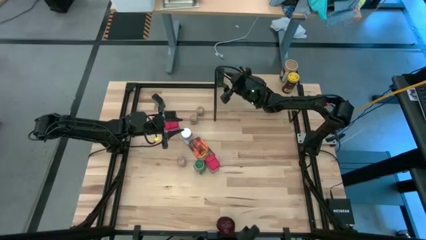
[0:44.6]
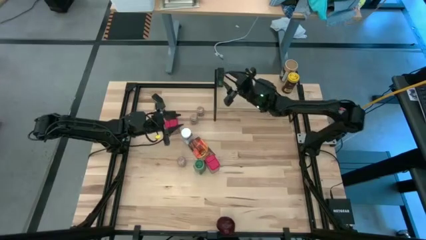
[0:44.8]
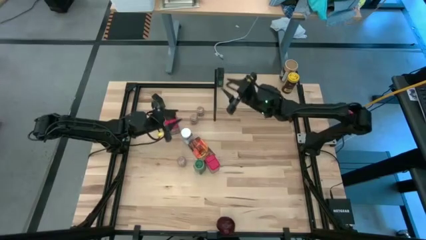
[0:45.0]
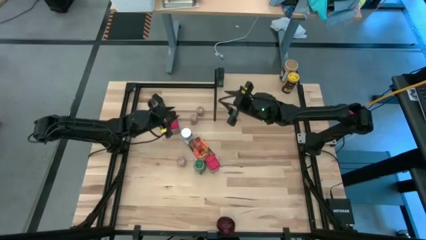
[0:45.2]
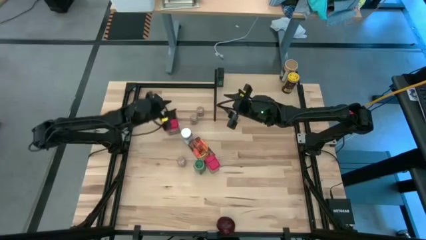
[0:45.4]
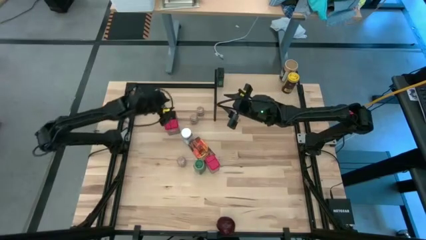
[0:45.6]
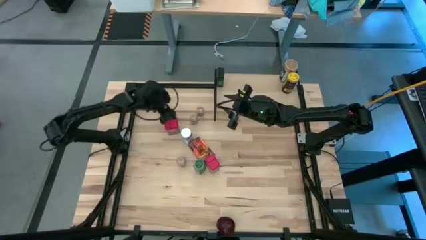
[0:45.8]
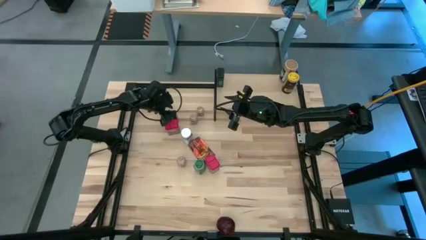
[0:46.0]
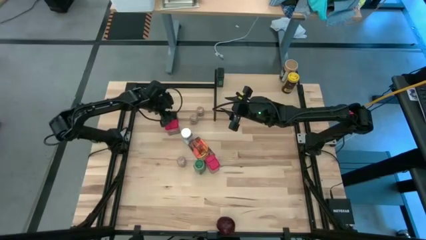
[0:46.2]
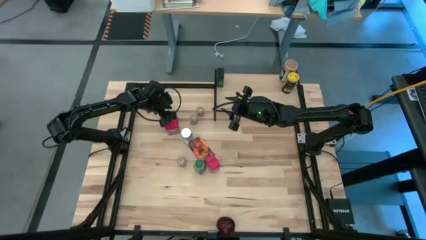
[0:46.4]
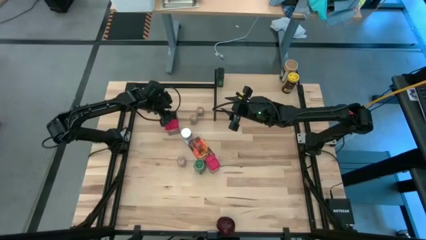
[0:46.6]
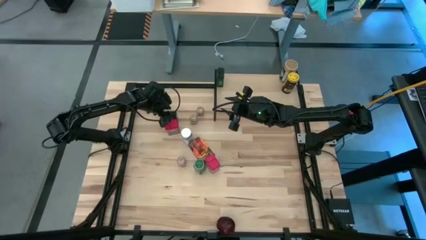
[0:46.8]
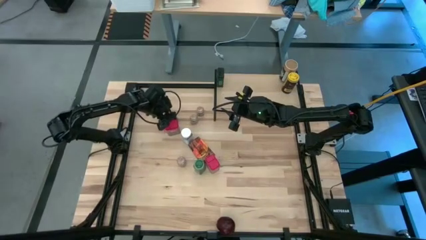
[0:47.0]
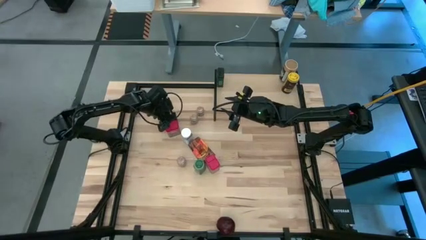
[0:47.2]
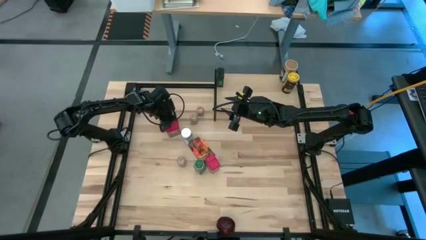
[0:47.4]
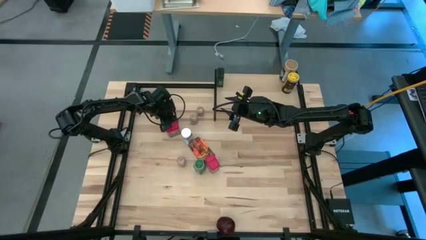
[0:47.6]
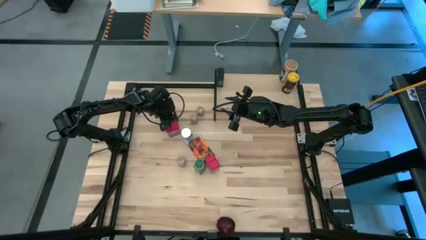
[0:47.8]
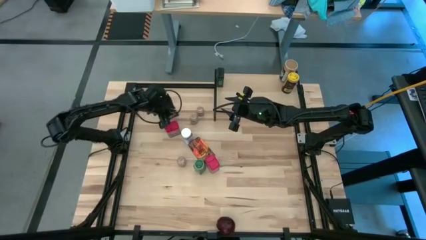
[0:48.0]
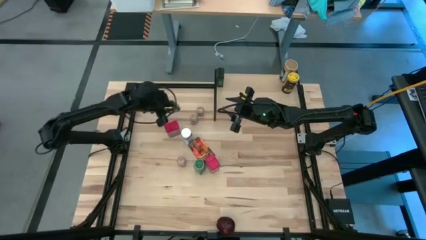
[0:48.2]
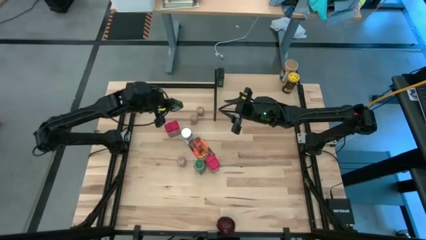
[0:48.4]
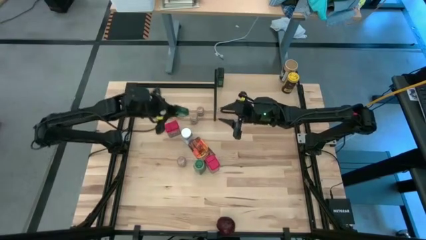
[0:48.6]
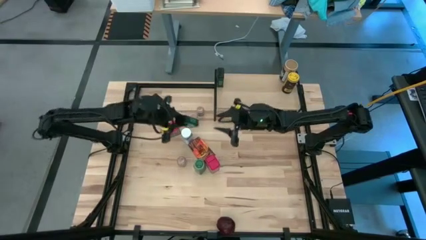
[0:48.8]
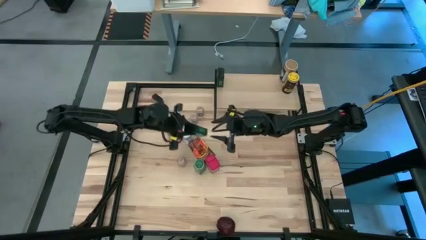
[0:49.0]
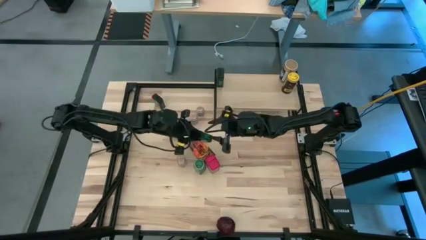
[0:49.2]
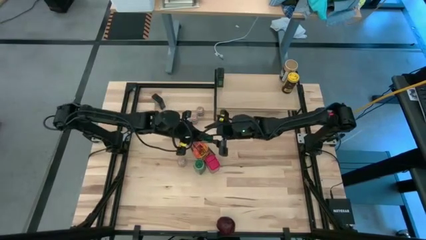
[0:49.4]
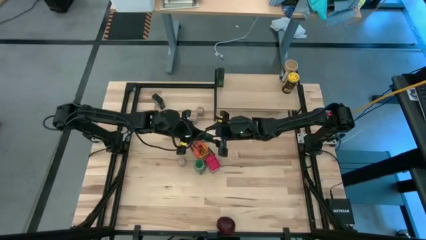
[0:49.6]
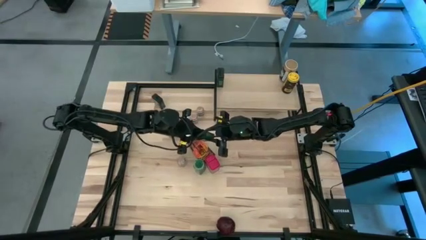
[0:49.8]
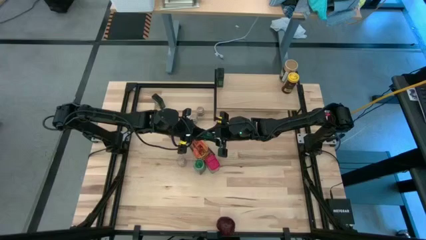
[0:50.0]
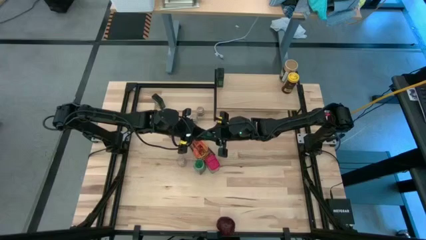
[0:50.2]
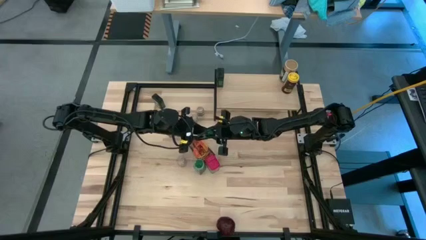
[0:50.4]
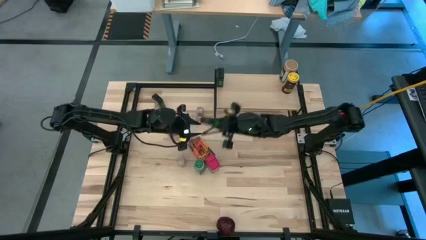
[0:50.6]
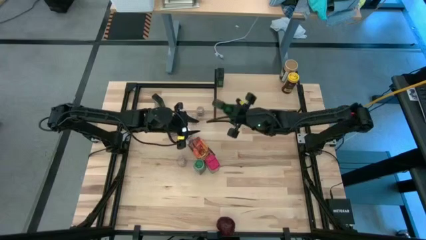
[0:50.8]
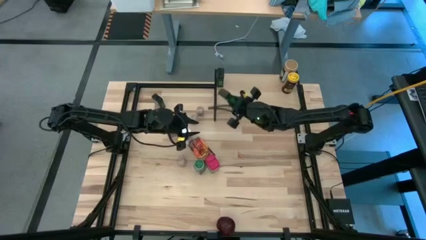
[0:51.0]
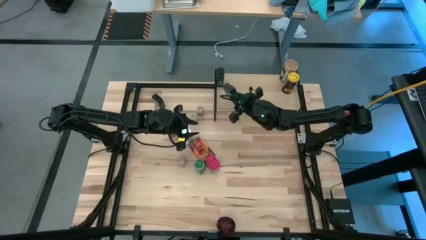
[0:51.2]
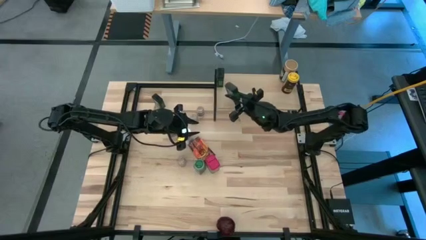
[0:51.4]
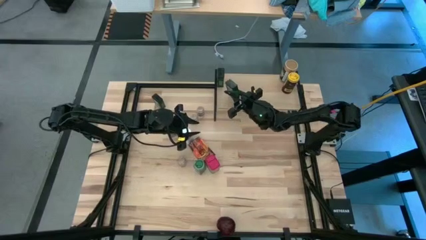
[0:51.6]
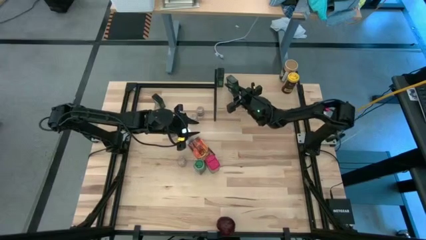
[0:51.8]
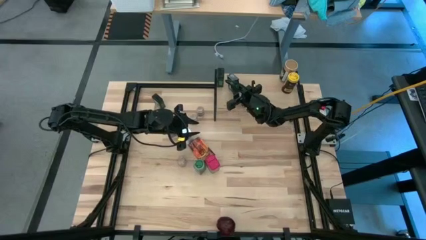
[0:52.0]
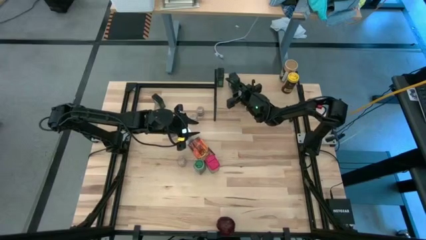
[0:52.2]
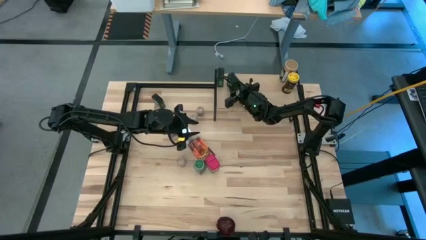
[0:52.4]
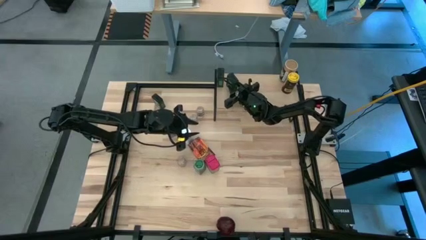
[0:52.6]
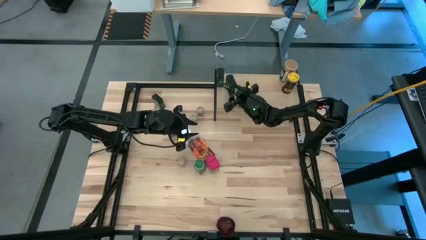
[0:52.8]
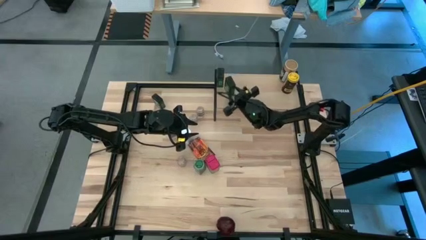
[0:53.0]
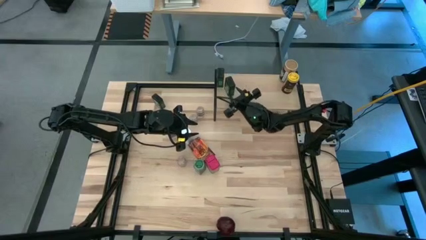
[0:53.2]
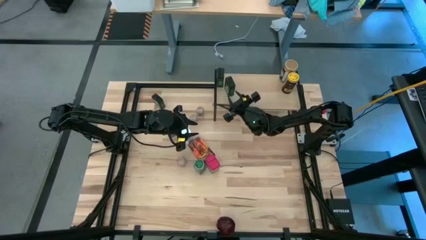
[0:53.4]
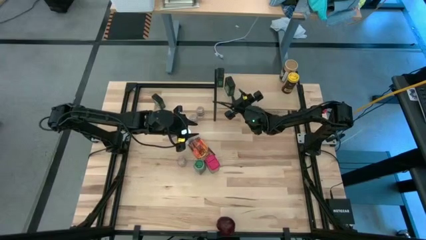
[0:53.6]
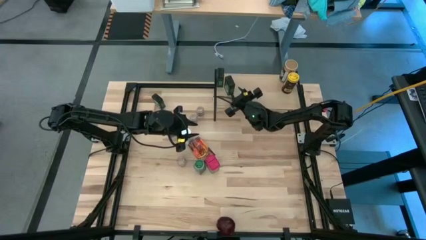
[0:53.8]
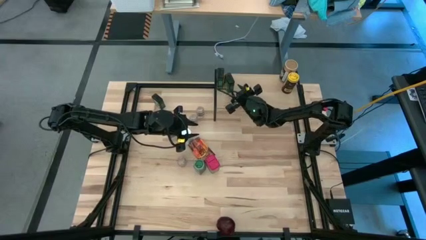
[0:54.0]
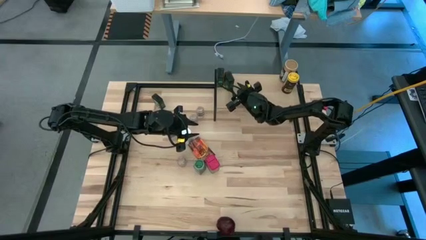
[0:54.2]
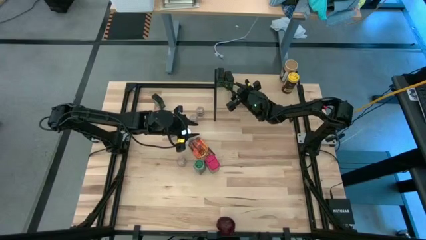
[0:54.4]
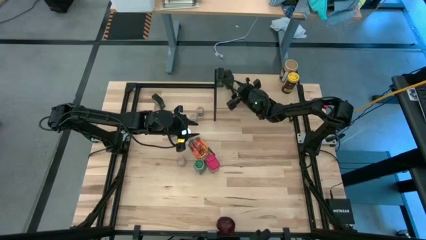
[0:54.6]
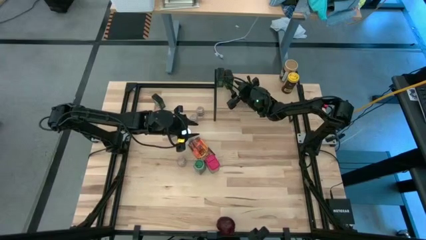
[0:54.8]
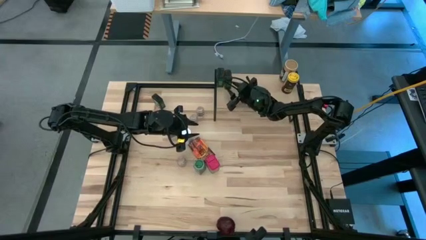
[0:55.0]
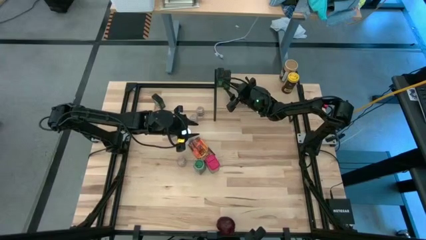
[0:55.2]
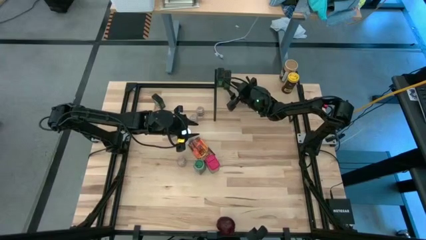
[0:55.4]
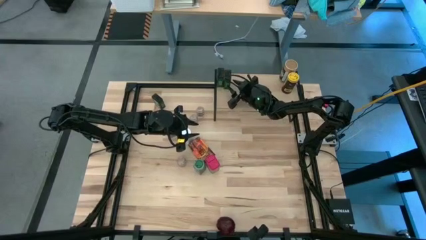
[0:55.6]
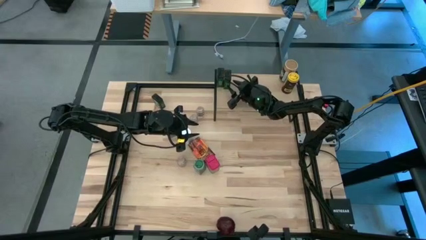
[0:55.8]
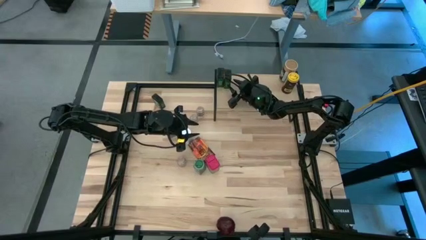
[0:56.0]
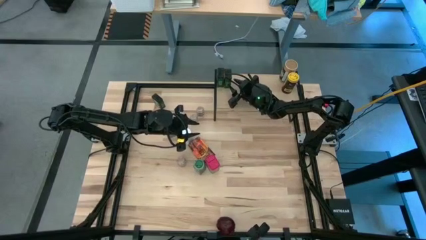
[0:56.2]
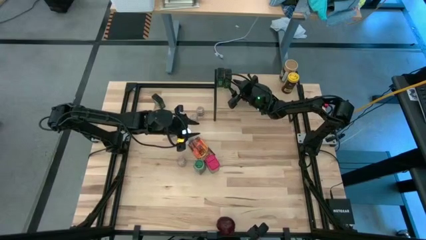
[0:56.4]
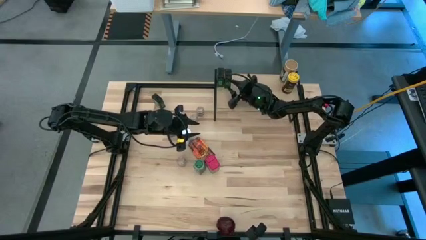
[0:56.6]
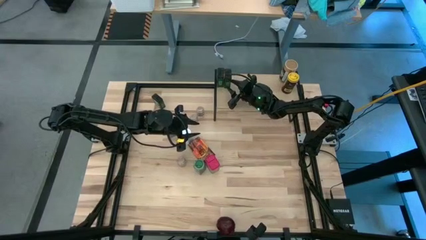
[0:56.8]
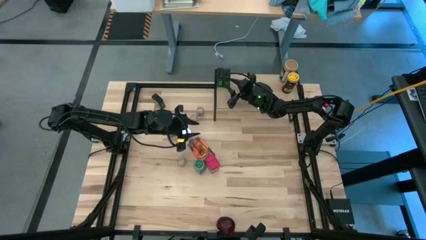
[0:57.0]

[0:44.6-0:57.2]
Task: Shelf spices
Put the bottom green seasoning can on the shelf
